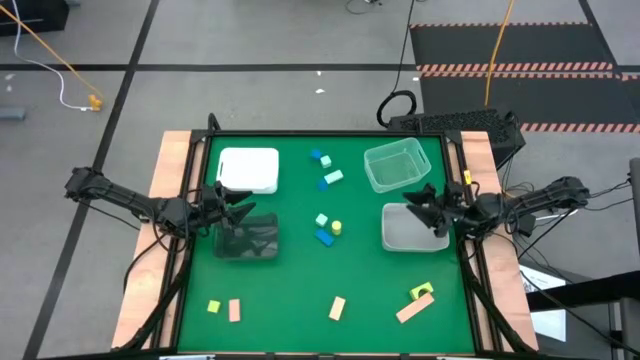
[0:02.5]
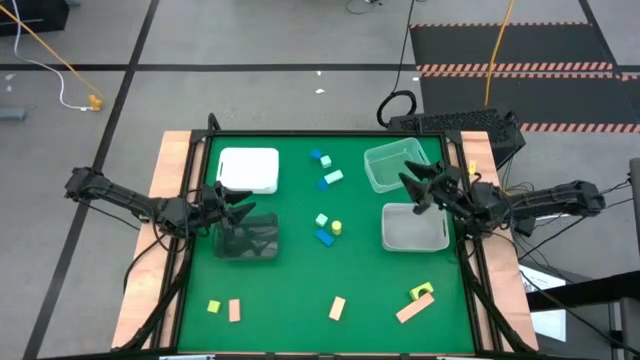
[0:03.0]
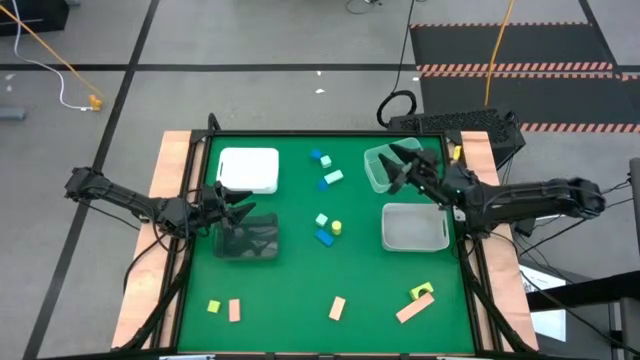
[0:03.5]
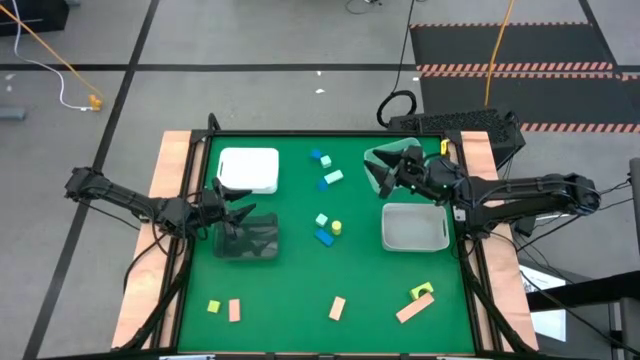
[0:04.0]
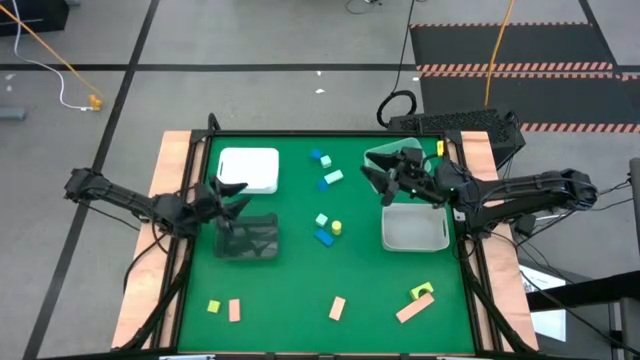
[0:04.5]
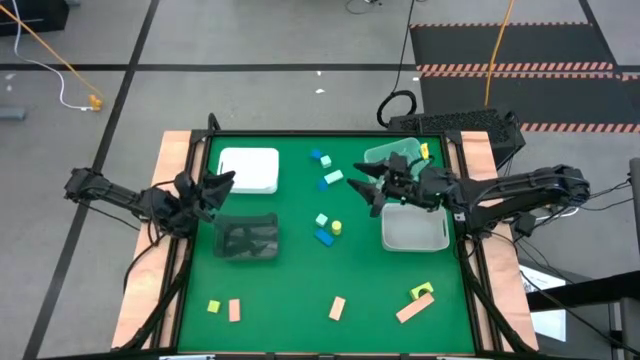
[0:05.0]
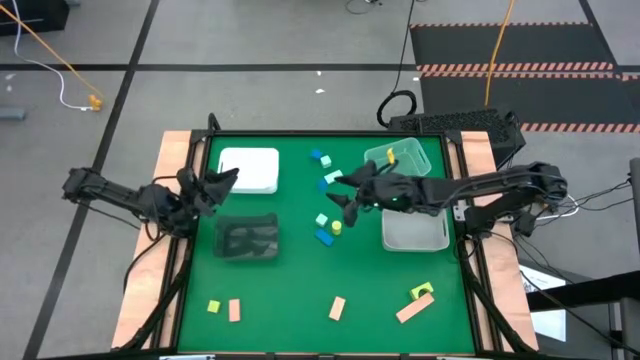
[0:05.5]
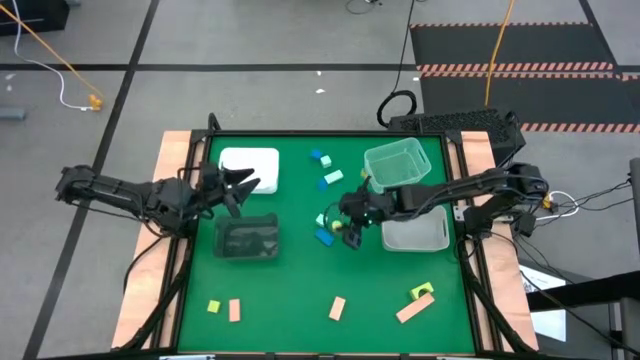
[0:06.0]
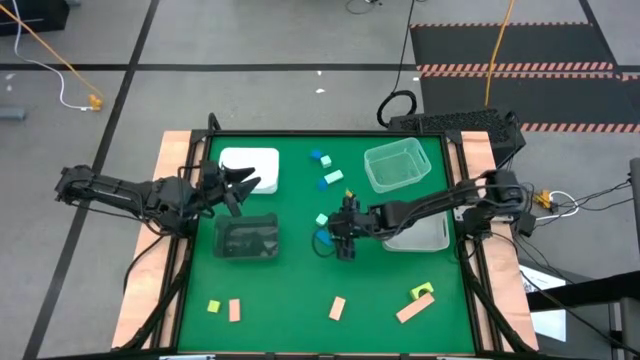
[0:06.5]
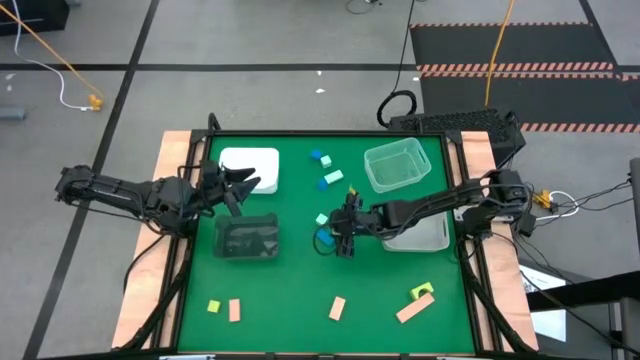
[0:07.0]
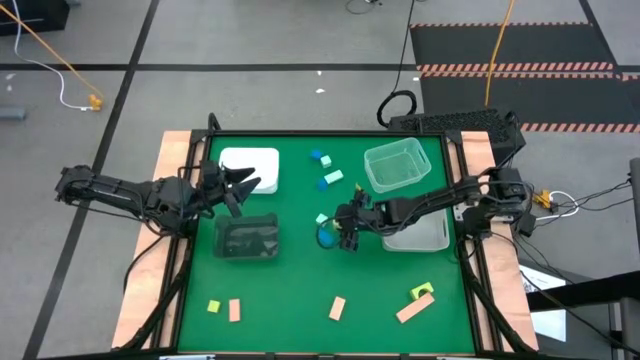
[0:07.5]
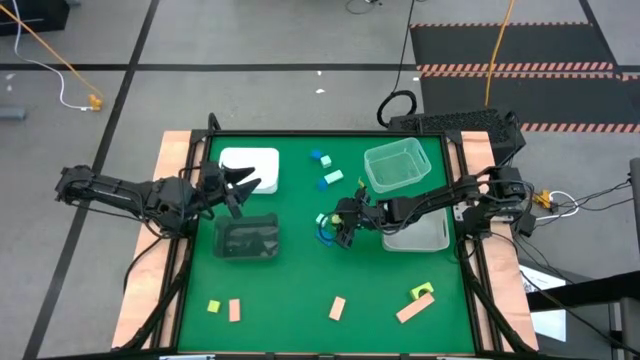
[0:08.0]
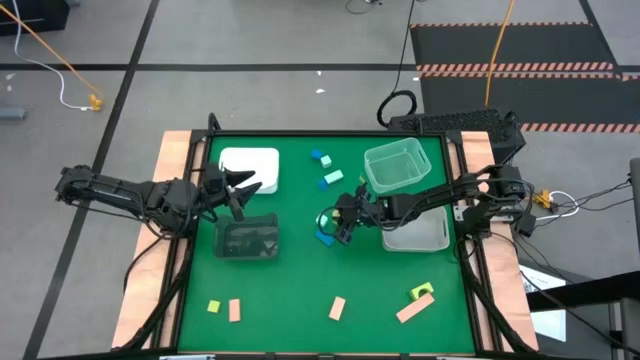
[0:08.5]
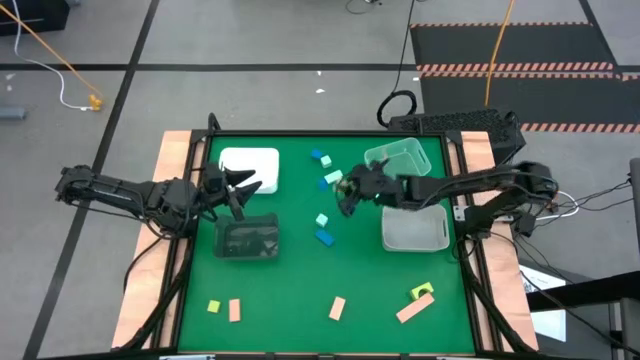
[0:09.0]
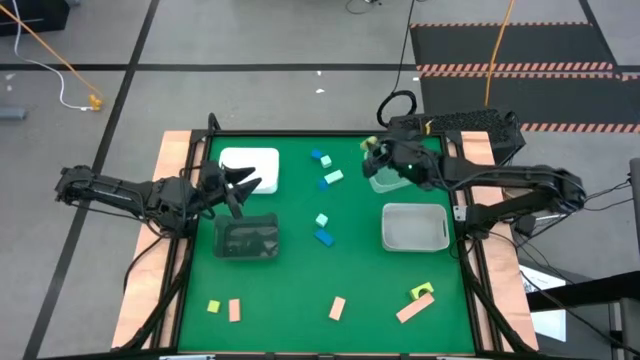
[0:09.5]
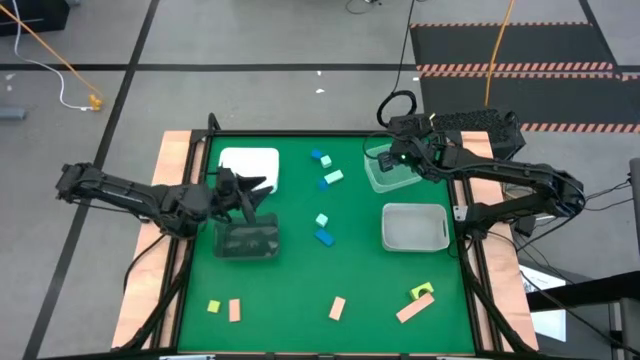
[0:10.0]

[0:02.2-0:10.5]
Task: Sort & place blocks by color
Put the light green block into the transparent bin

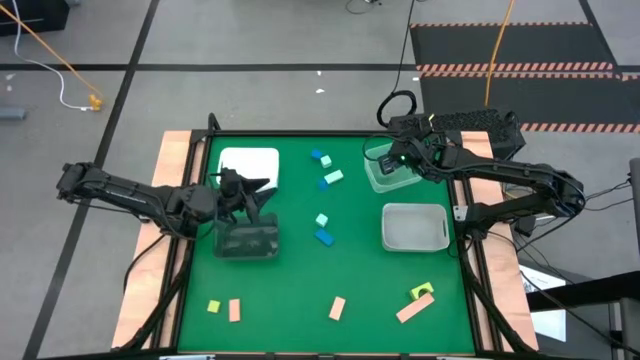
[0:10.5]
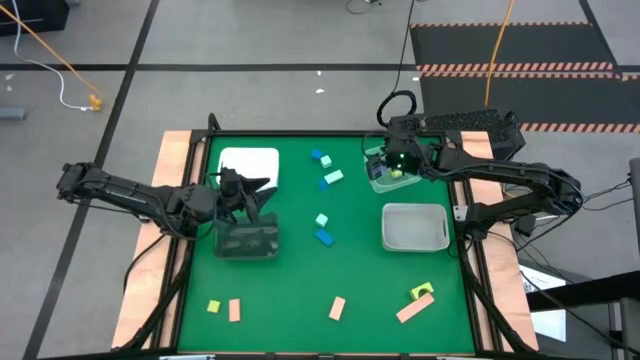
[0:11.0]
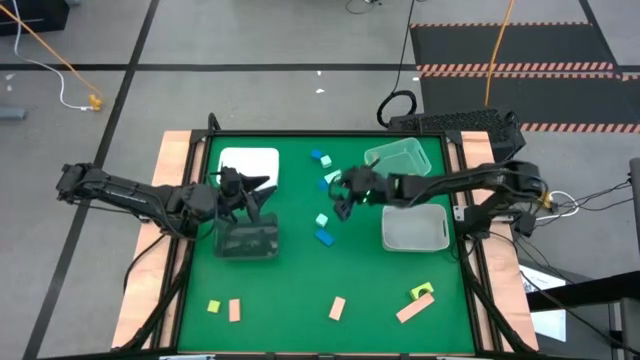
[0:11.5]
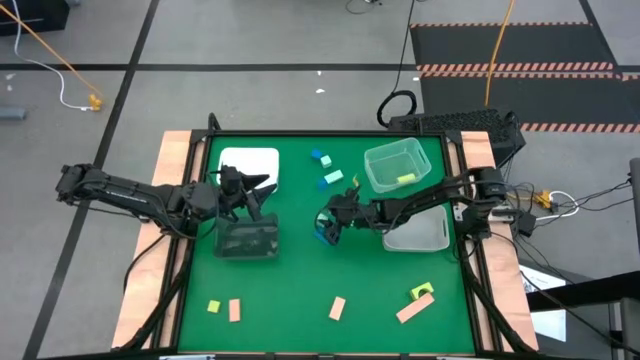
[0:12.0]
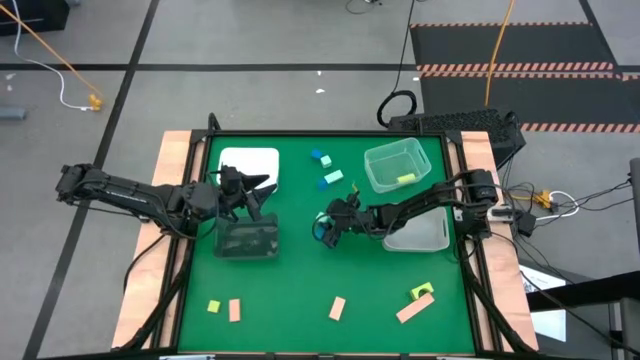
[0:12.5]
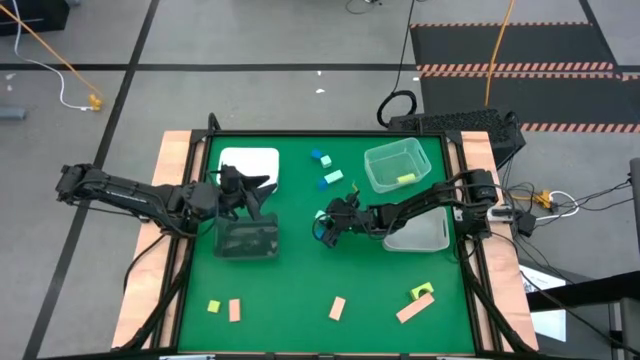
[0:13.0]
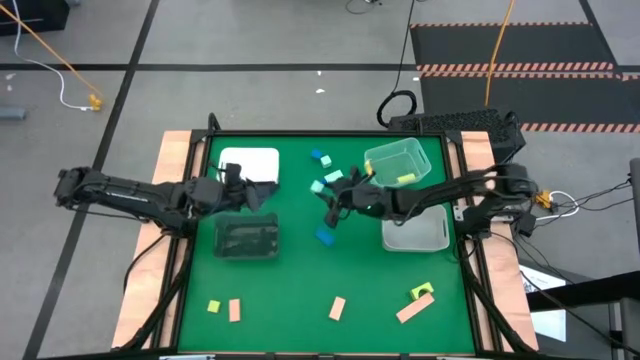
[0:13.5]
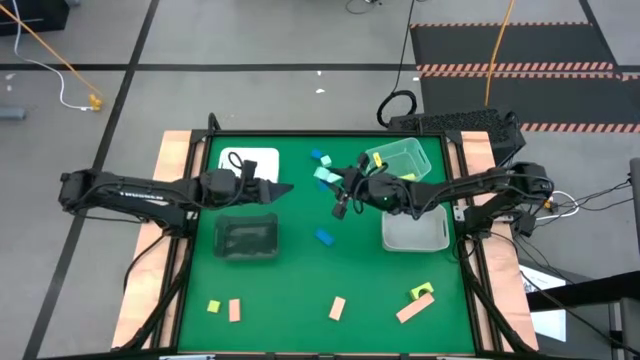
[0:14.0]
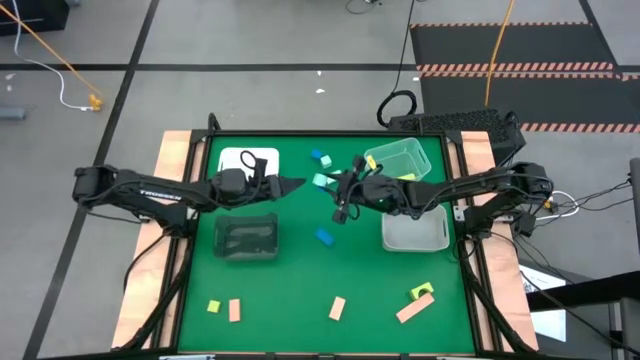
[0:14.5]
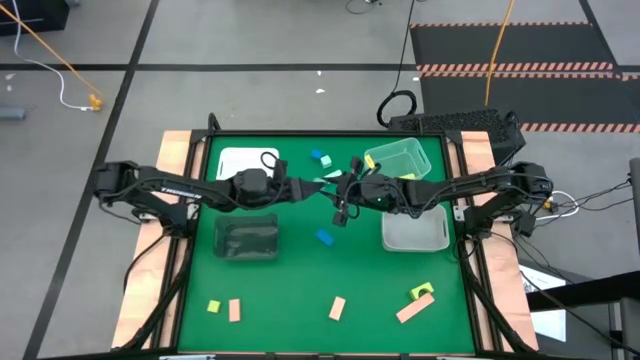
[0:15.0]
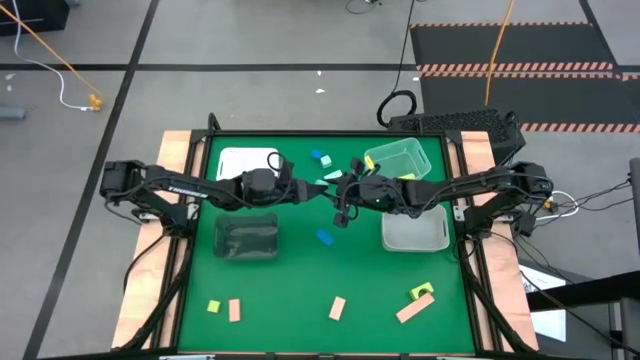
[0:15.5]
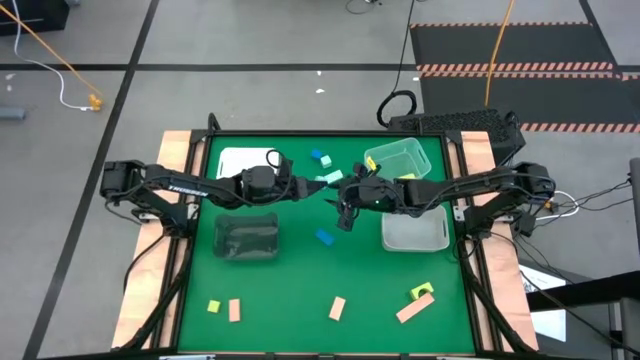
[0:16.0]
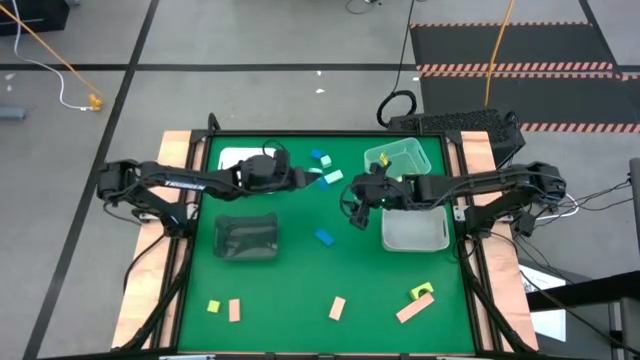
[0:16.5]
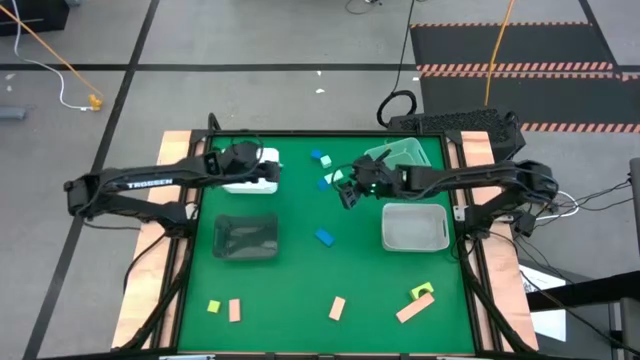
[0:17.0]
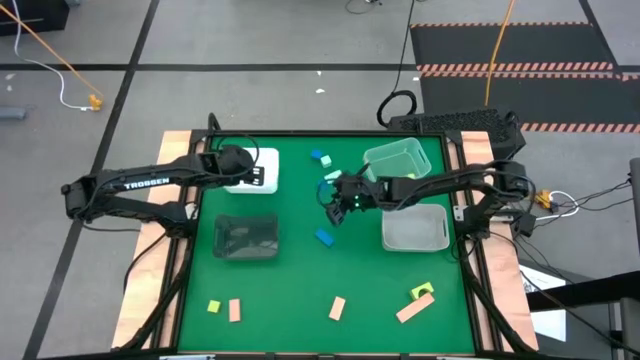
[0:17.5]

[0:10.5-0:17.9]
Put the light blue block into the white bin

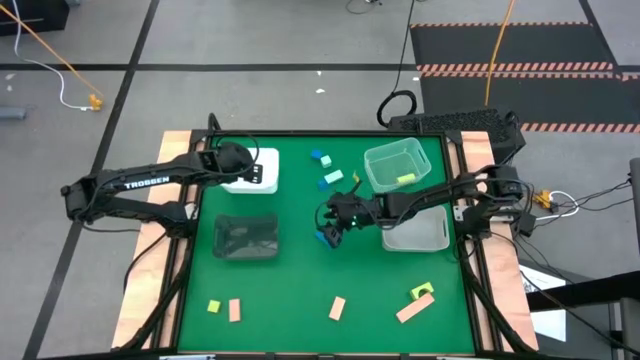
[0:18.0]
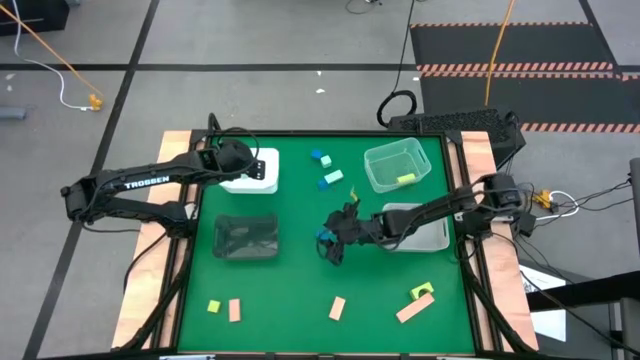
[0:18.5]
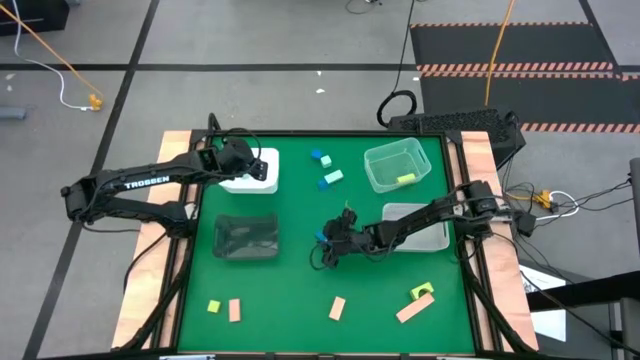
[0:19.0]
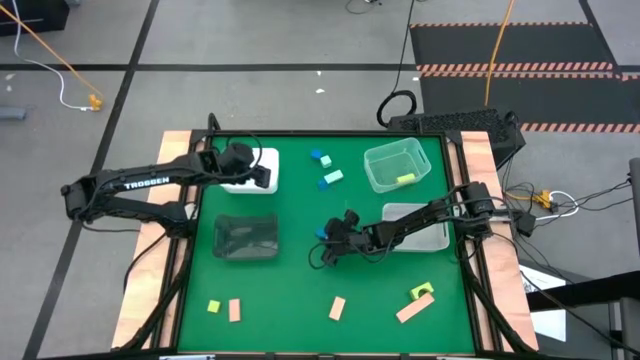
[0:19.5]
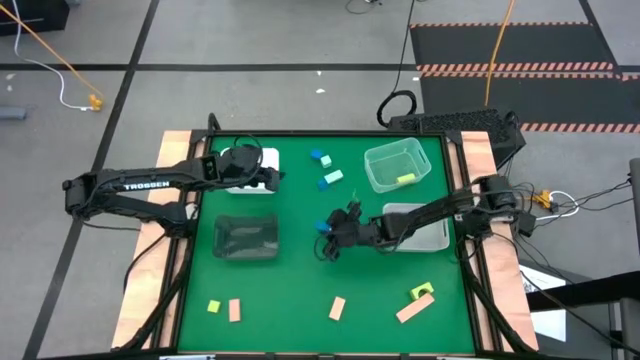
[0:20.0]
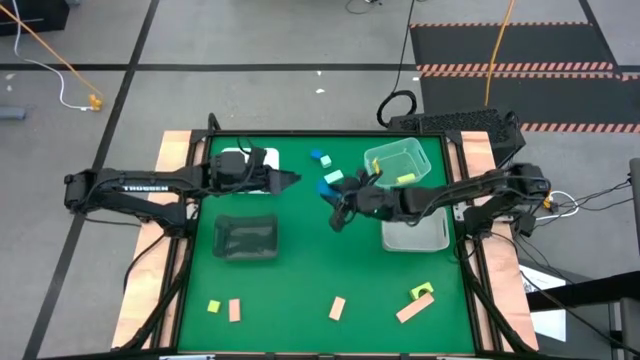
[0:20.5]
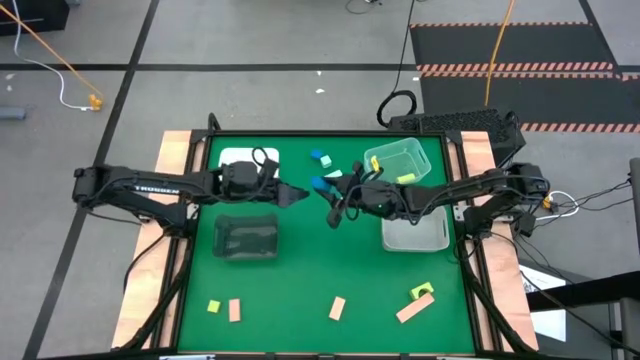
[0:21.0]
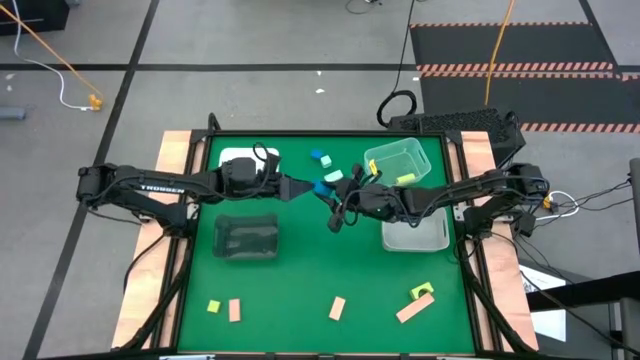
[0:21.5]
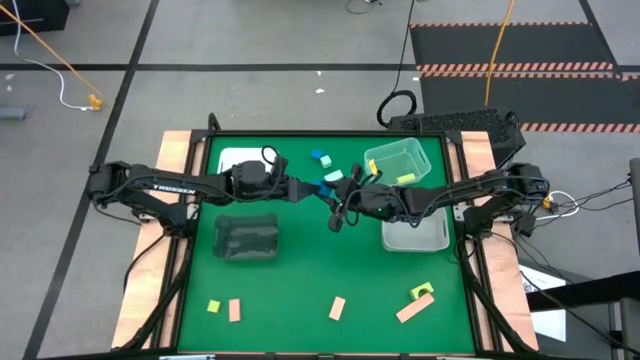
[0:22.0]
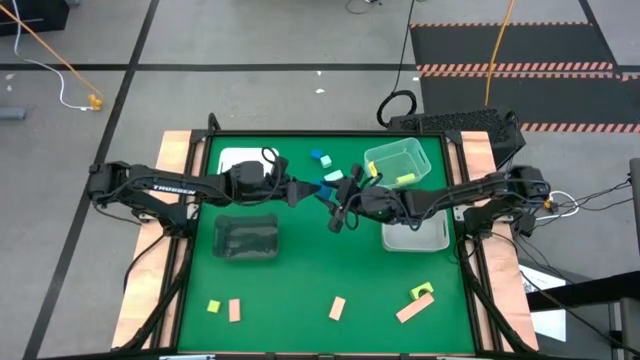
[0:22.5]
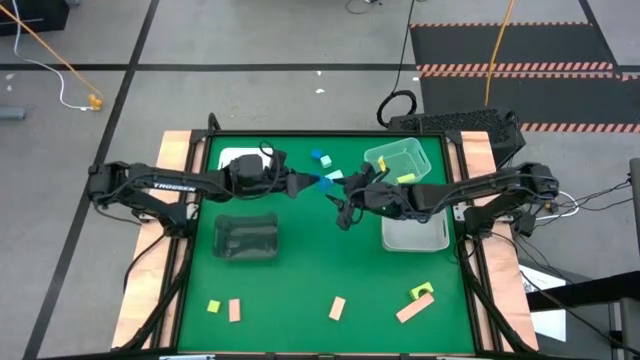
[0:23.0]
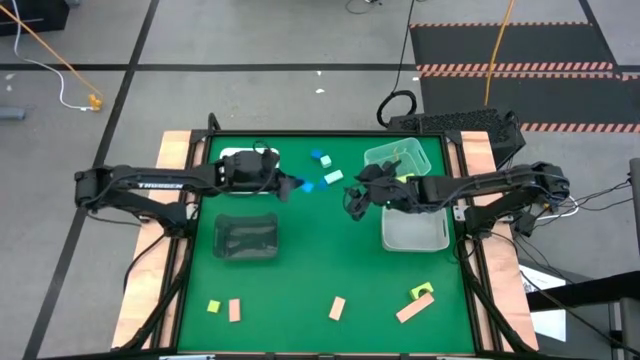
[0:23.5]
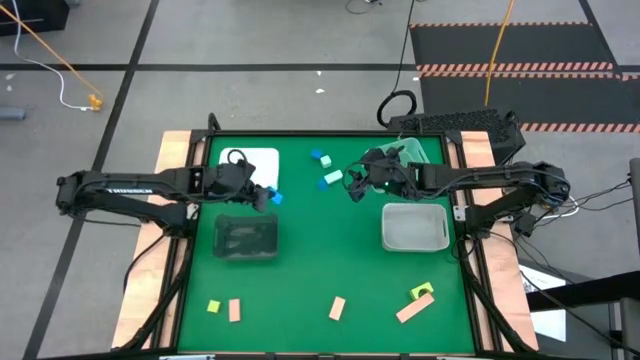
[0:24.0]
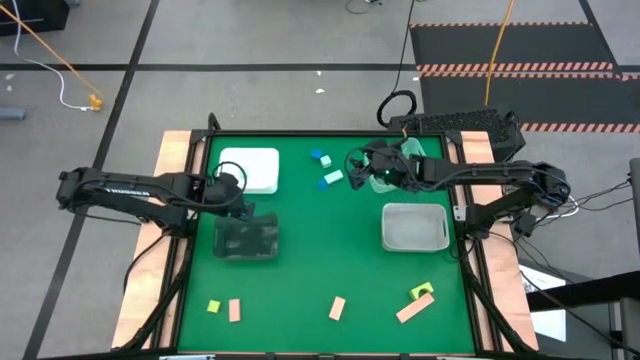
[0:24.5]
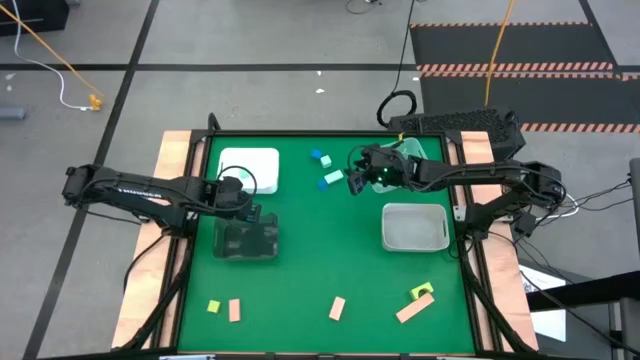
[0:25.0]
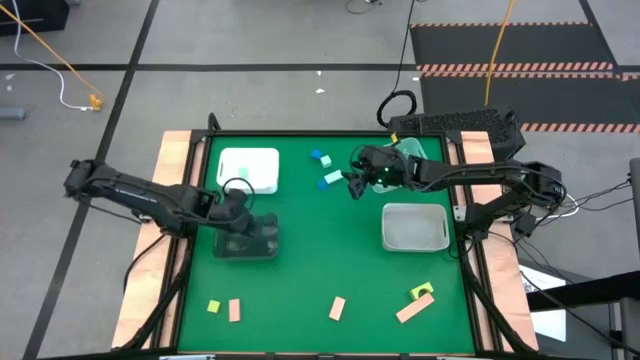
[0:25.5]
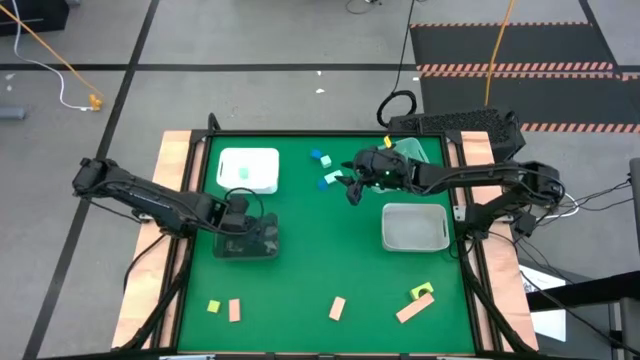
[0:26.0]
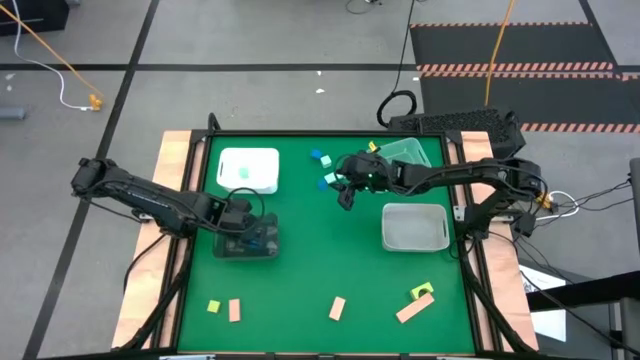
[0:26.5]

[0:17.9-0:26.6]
Put the blue block into the black bin
